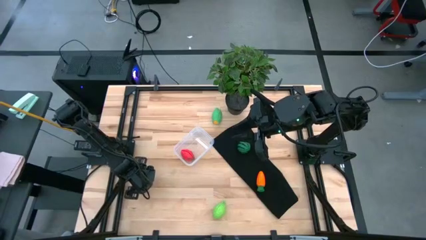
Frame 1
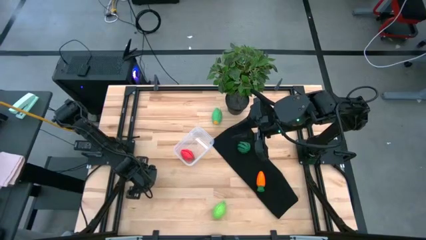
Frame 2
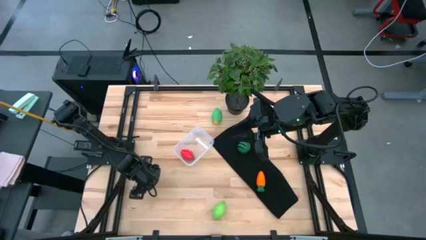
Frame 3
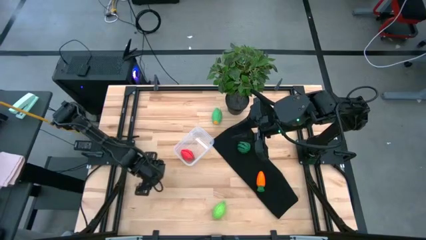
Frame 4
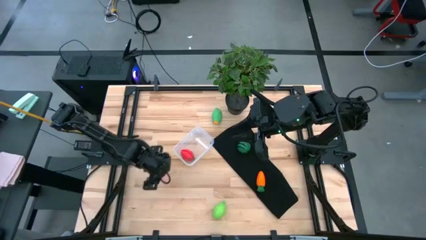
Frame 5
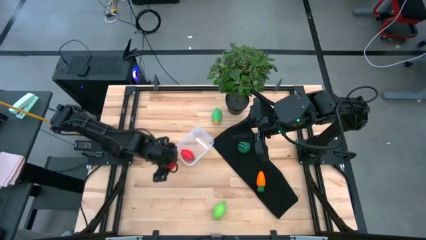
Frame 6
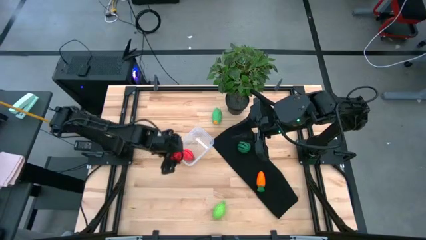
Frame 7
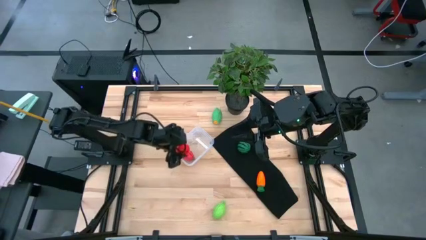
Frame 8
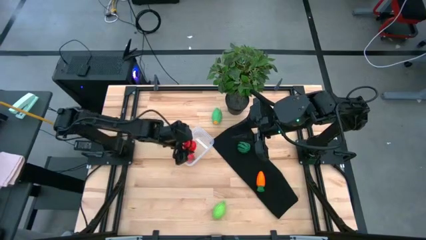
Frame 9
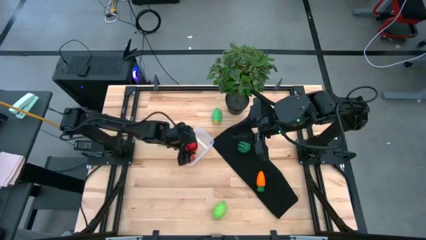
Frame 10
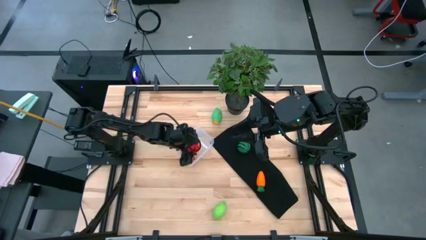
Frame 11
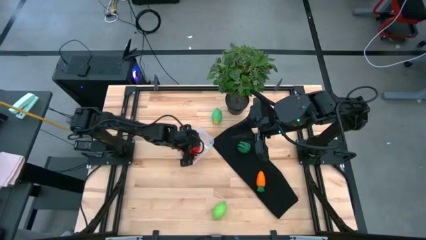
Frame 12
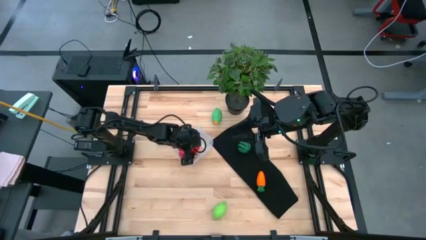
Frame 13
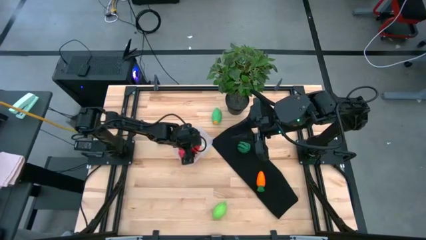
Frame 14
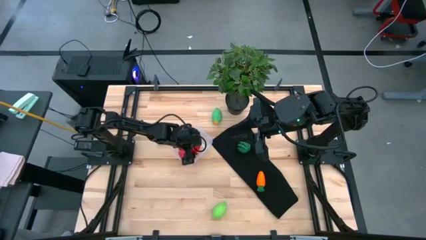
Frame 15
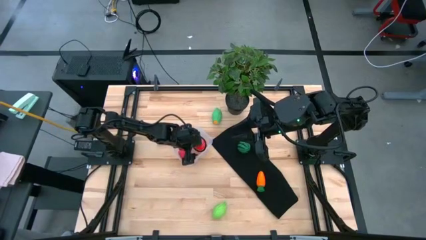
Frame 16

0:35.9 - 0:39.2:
Task: Pick and placing Produce into tupperware
Put the red apple into the transparent bin

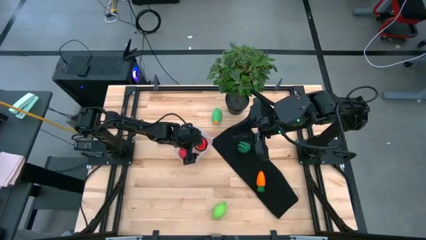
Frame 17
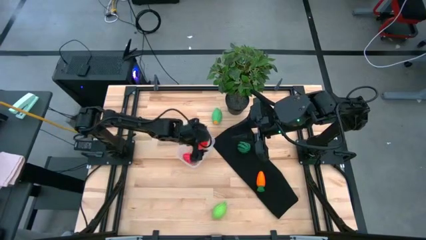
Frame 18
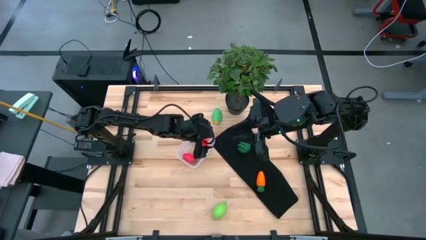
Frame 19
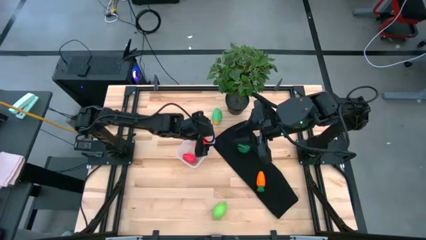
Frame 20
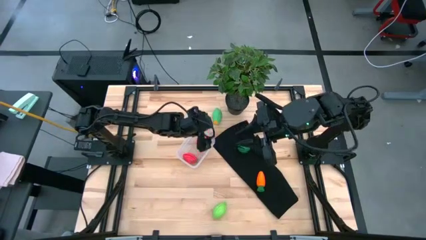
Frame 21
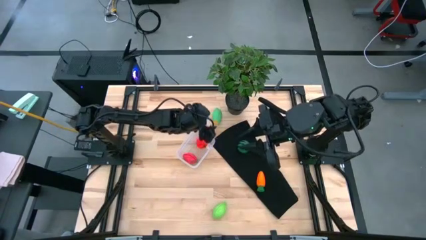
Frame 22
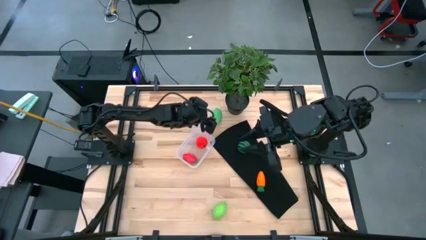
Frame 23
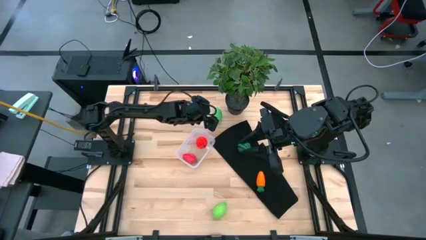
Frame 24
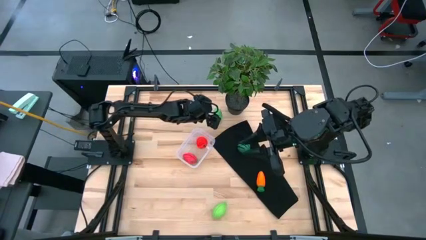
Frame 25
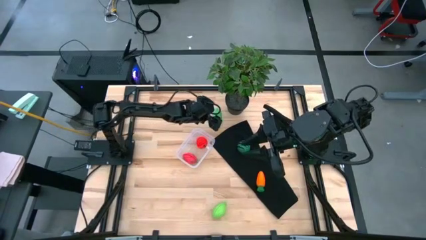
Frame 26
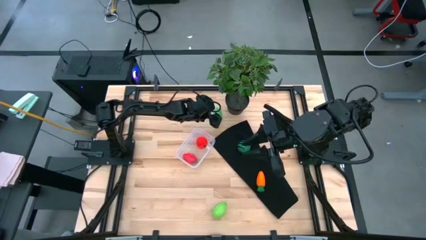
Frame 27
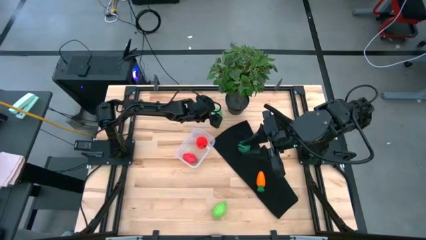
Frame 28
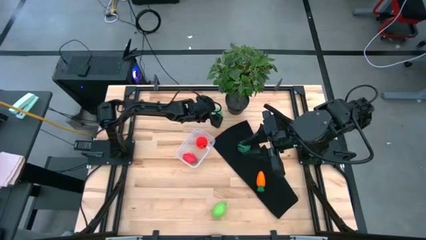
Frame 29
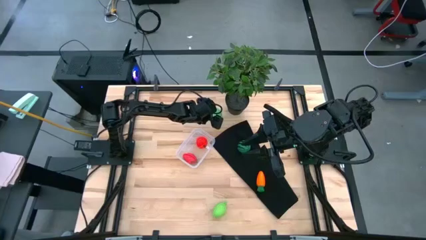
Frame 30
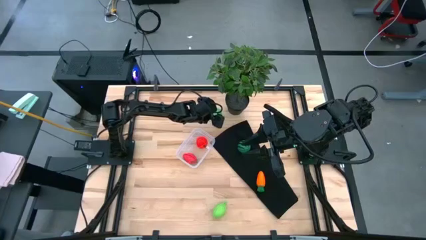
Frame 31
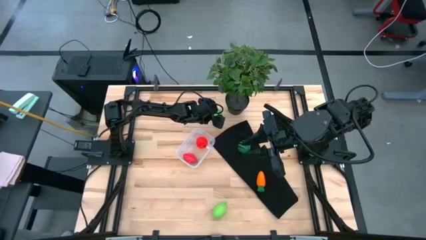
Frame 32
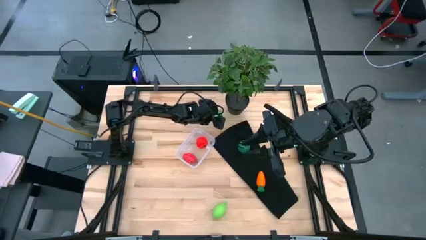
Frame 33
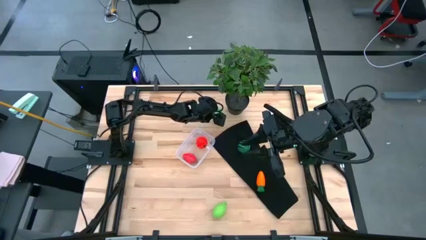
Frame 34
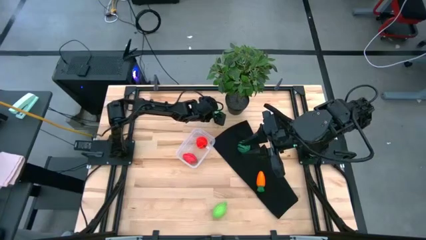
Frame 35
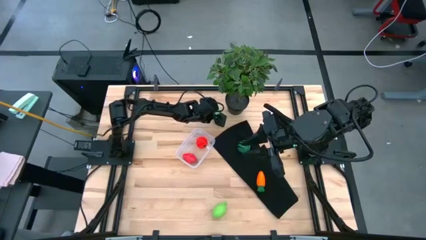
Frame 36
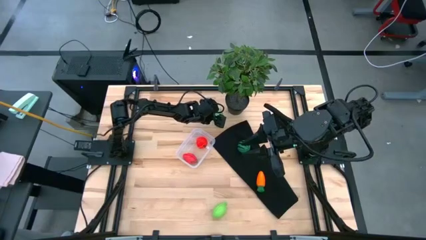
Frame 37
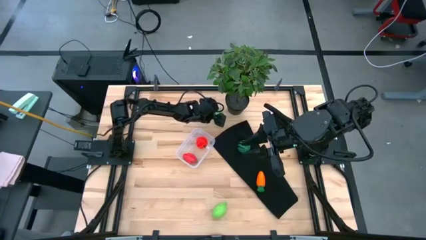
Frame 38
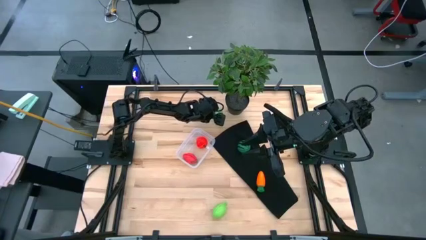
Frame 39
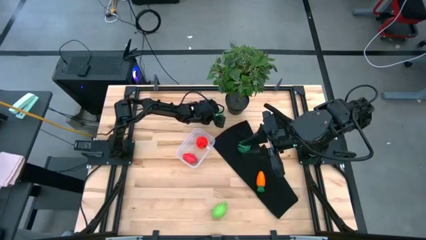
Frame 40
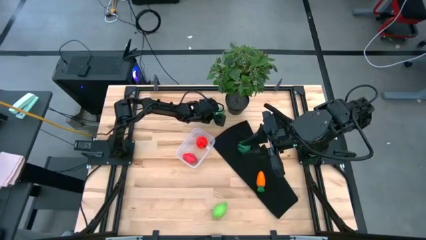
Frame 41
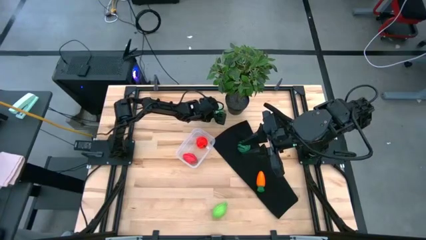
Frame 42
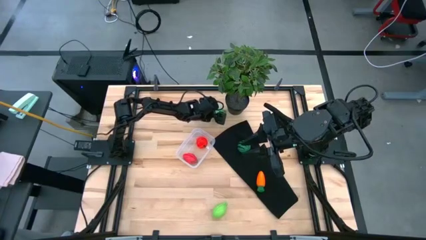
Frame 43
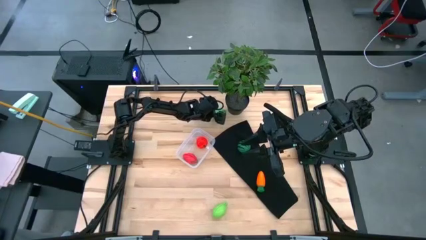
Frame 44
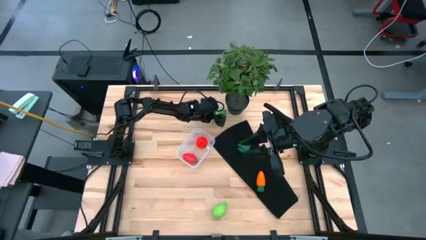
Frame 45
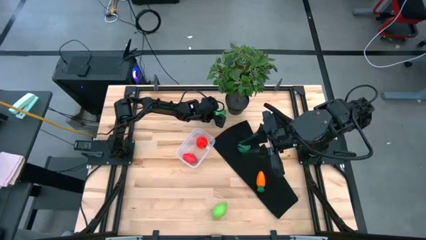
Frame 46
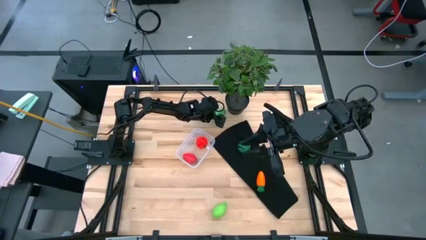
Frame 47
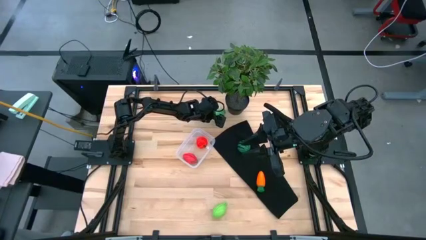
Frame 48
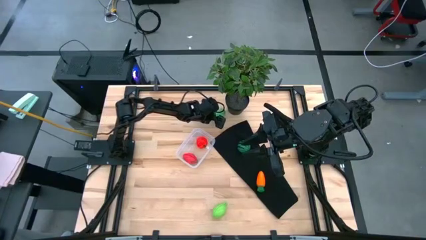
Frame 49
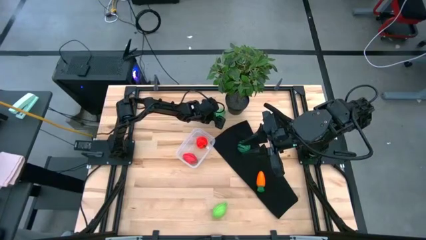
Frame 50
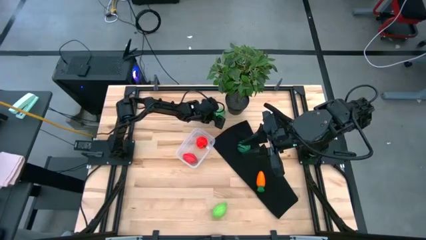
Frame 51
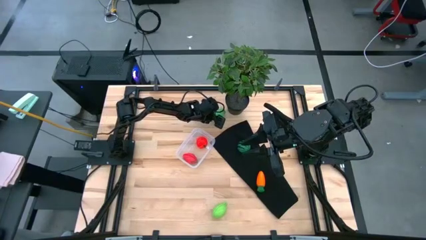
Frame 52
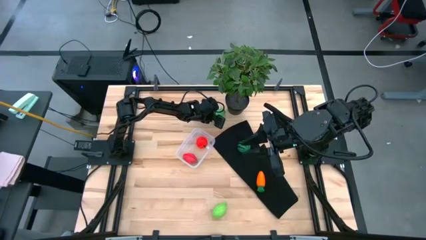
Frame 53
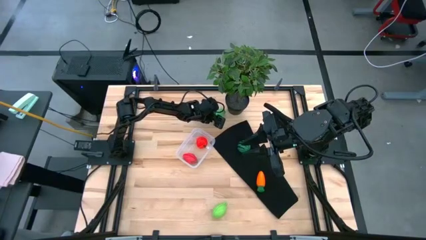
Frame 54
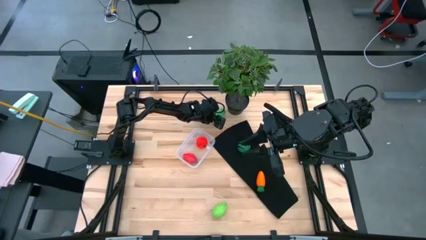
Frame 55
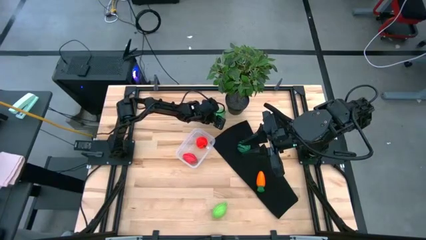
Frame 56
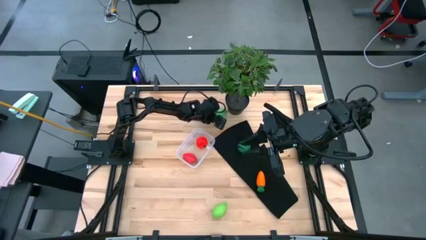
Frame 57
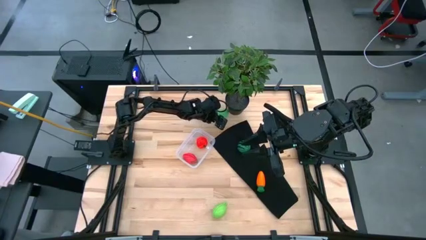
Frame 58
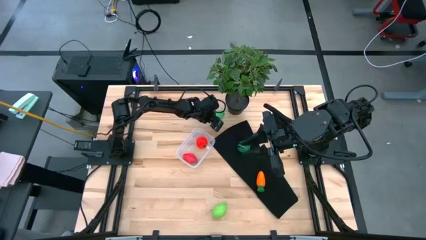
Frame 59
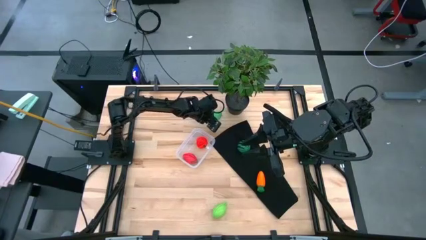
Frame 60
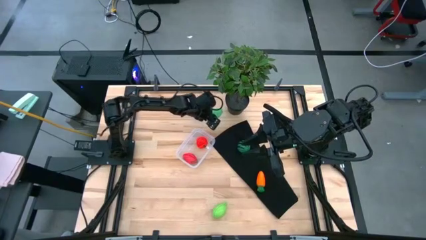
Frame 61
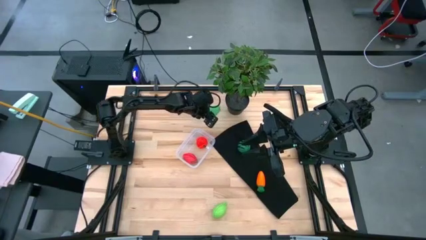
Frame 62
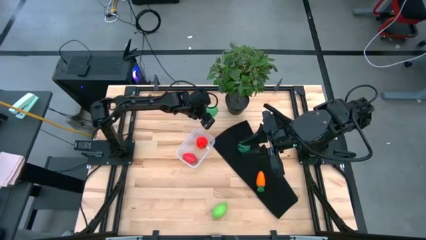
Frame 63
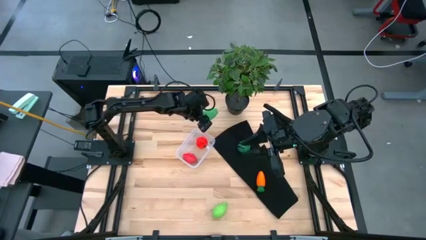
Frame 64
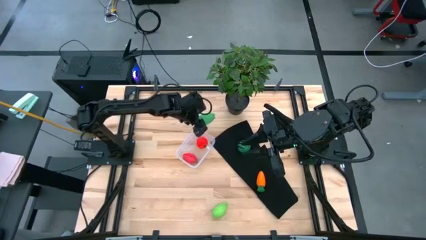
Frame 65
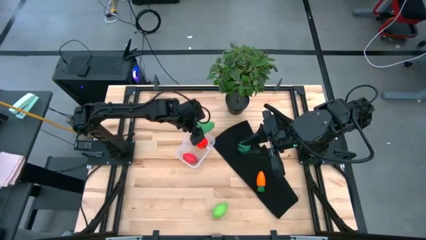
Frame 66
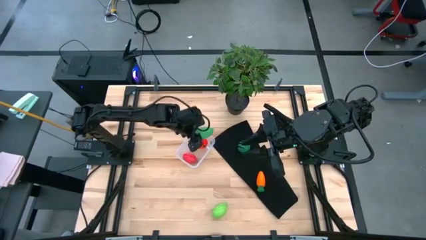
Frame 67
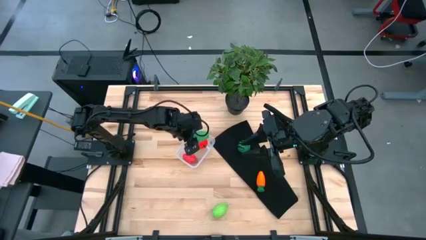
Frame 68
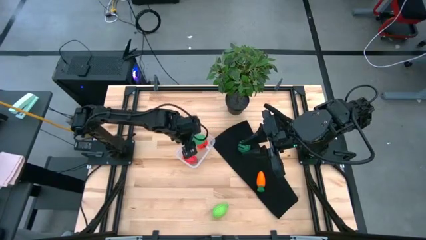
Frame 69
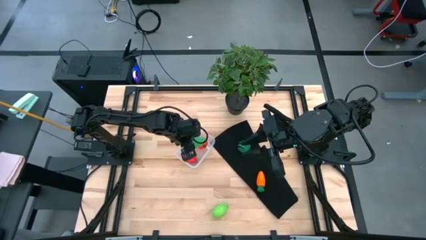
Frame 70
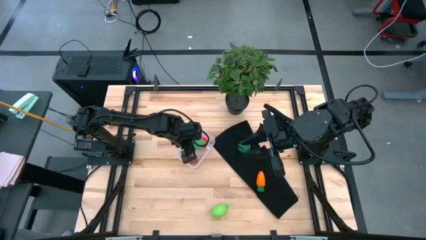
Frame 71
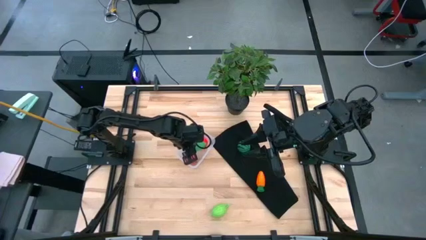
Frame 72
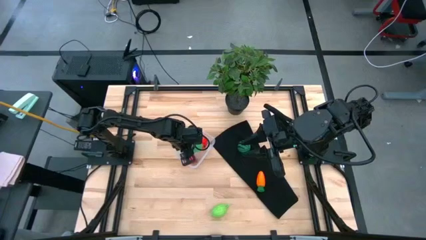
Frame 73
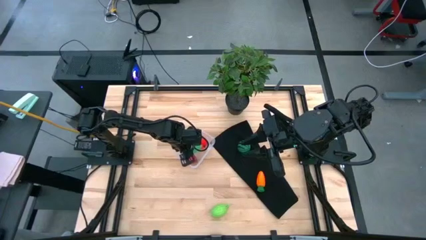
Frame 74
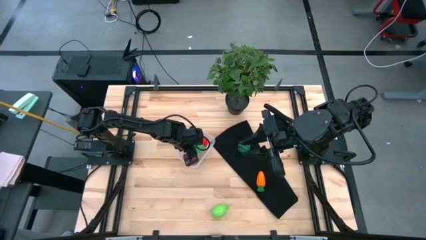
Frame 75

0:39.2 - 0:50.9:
Put the green corn into the transparent bin
